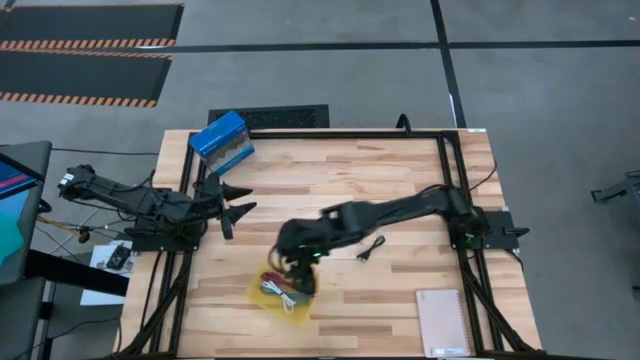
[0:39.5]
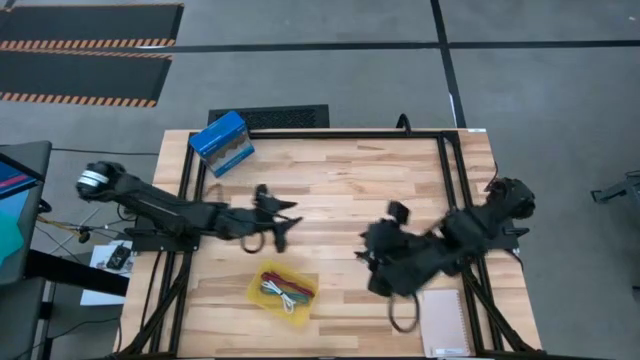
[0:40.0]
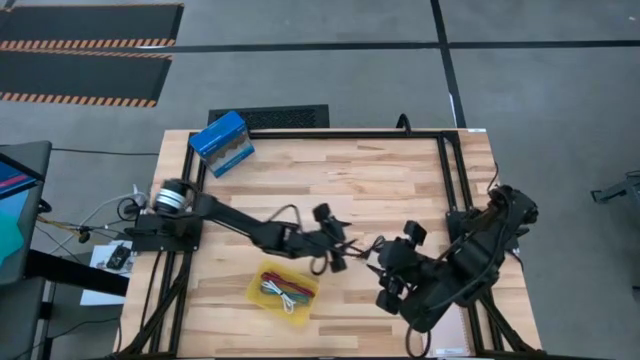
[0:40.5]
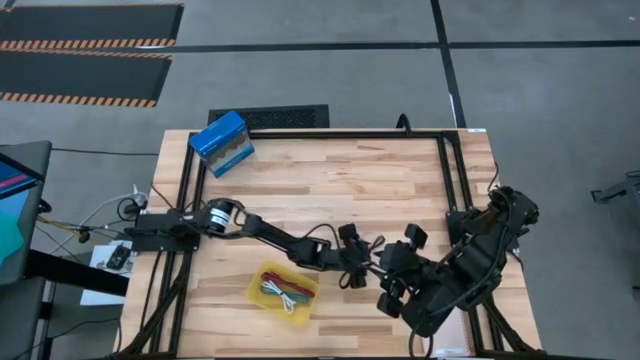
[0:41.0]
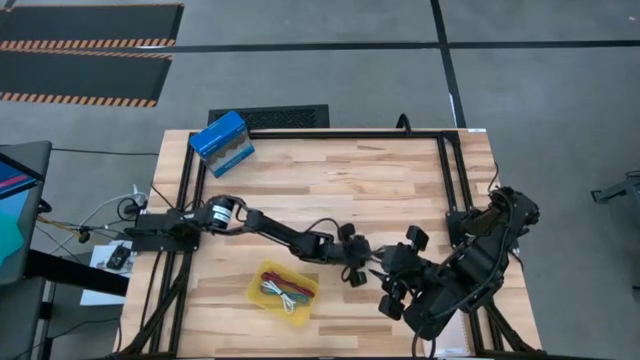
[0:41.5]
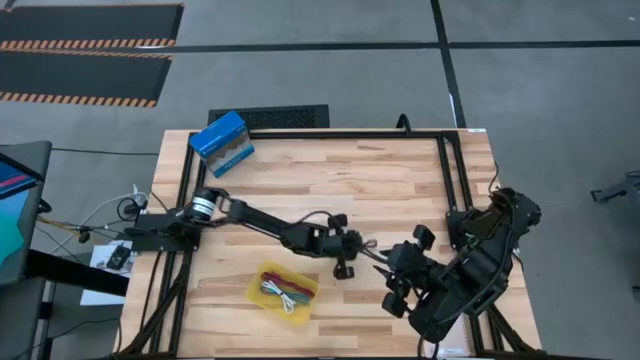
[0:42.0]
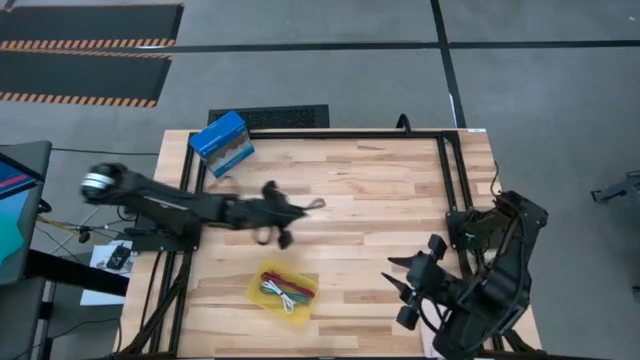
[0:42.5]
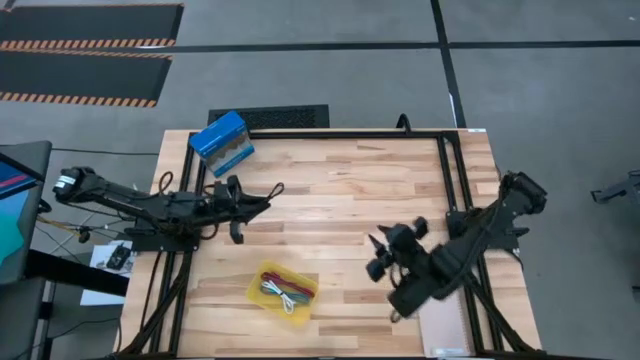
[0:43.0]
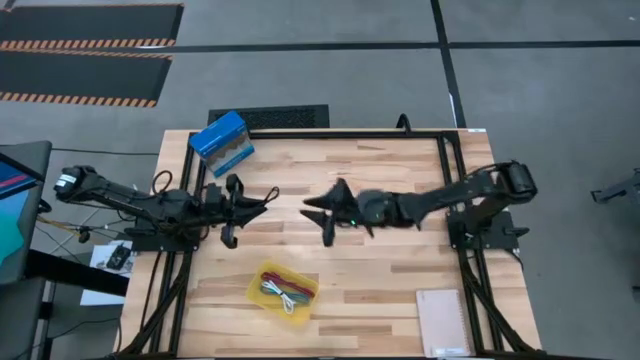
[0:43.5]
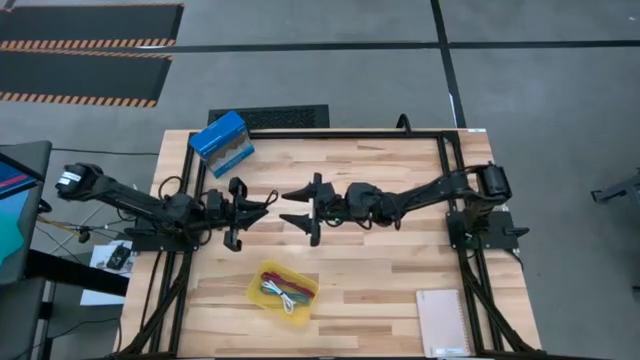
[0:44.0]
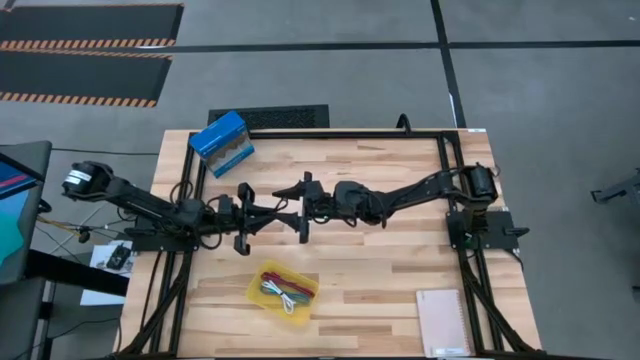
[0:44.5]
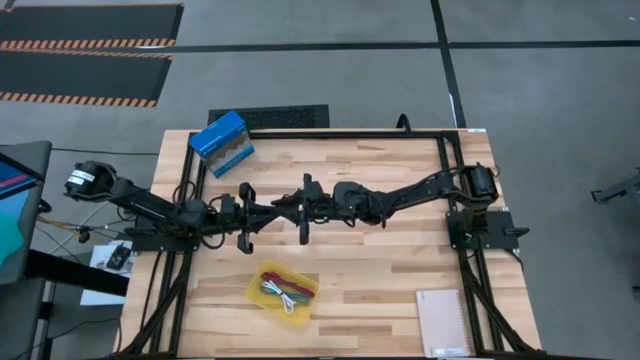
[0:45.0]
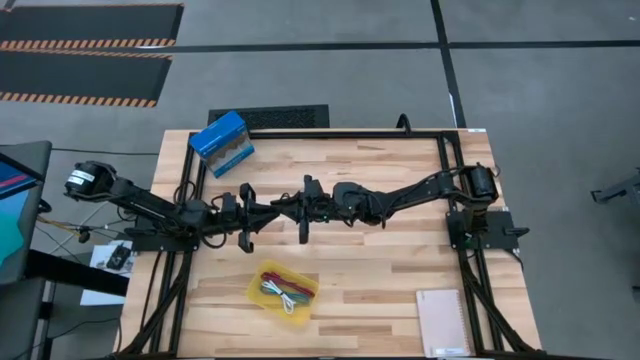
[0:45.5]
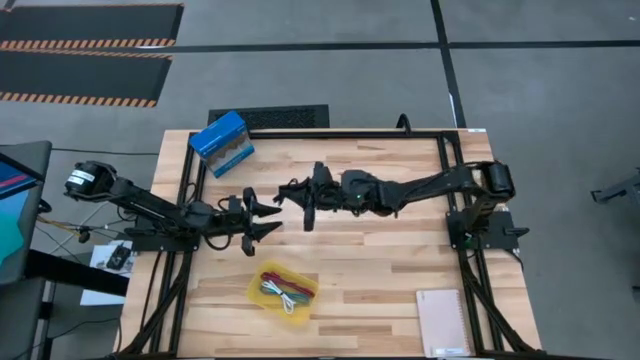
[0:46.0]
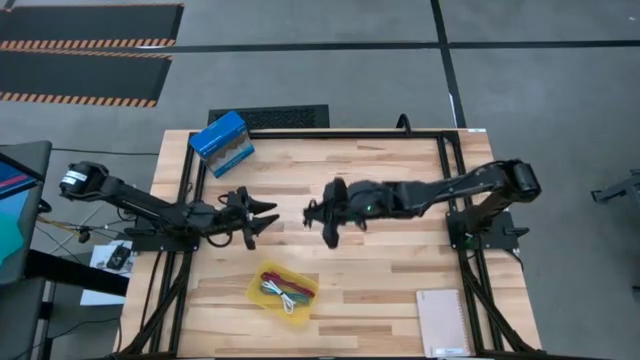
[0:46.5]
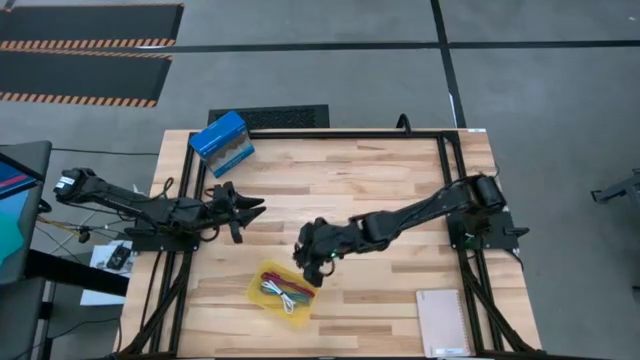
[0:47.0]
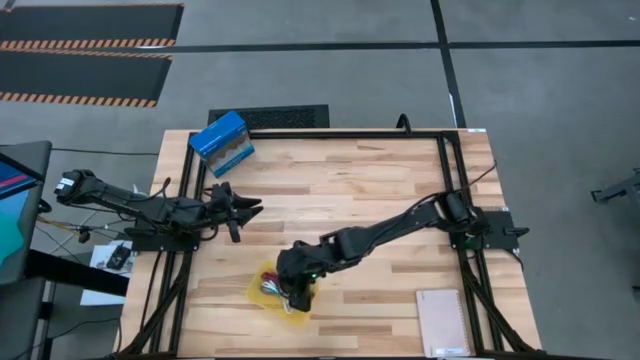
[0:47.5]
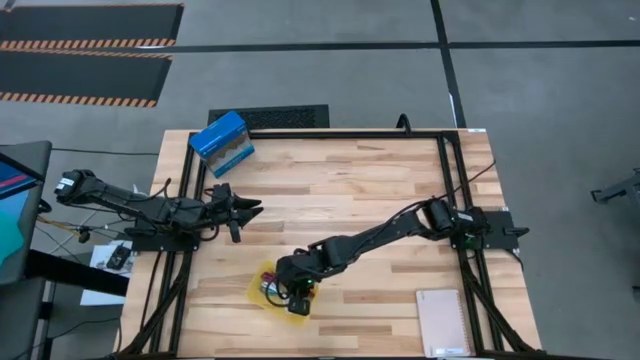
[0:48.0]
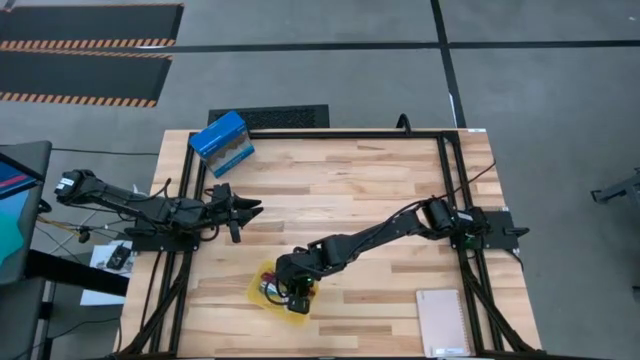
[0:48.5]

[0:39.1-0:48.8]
Task: Pick and place USB-C Cables
Put the black charger cable into the yellow transparent bin

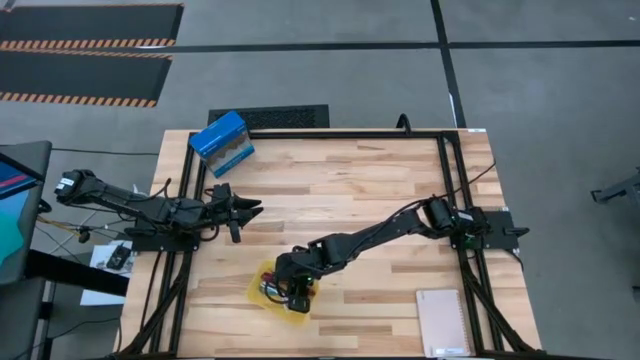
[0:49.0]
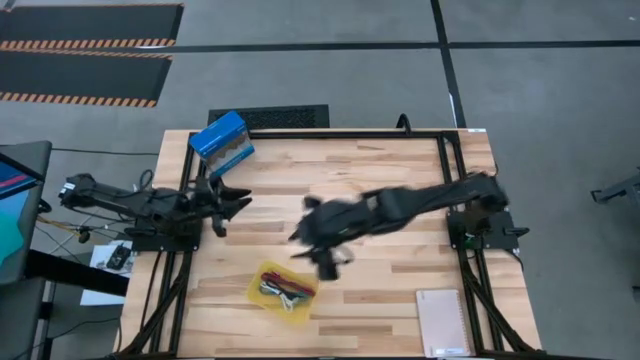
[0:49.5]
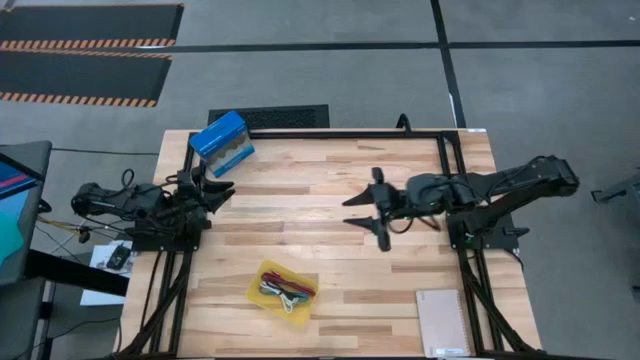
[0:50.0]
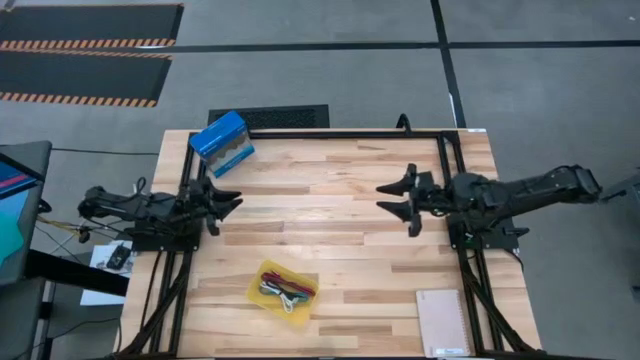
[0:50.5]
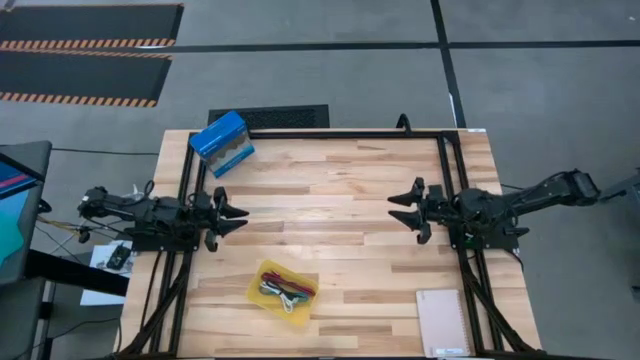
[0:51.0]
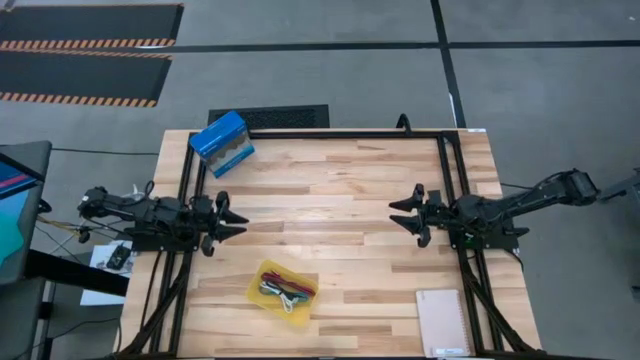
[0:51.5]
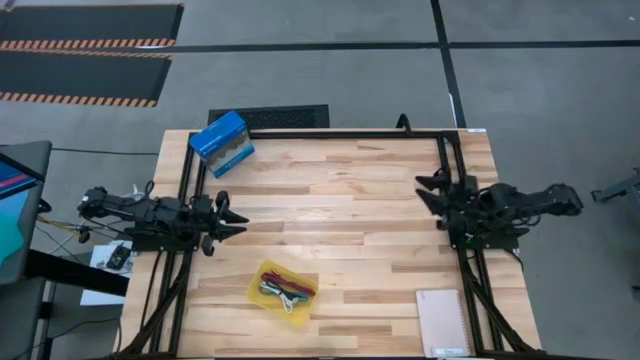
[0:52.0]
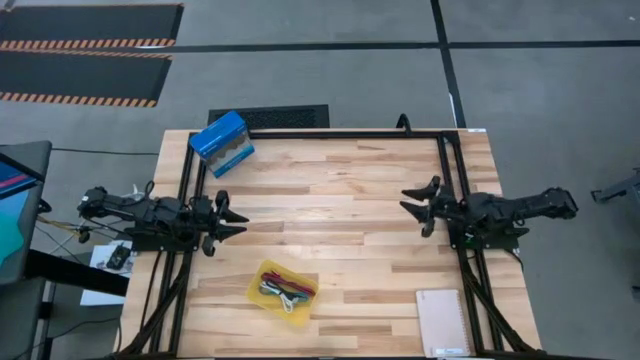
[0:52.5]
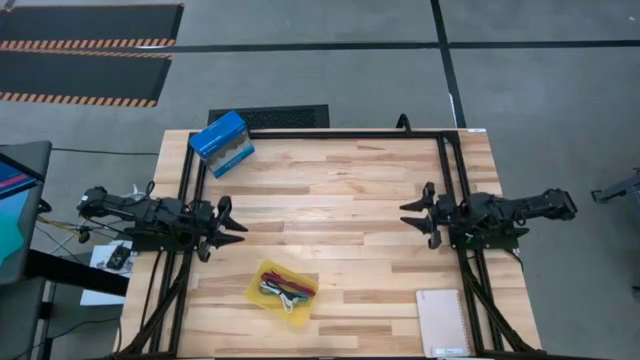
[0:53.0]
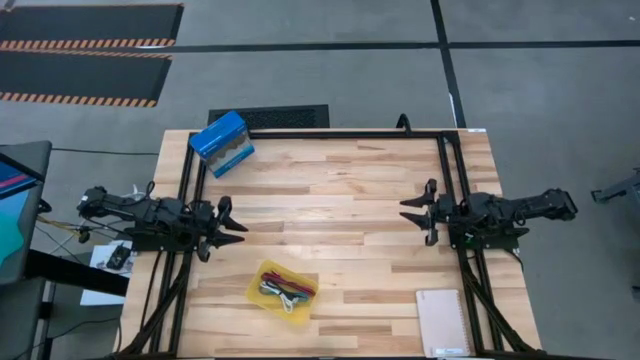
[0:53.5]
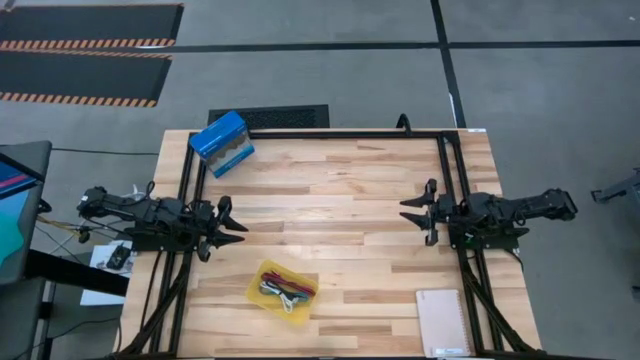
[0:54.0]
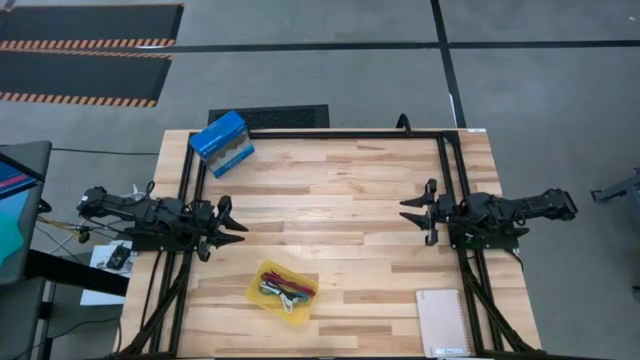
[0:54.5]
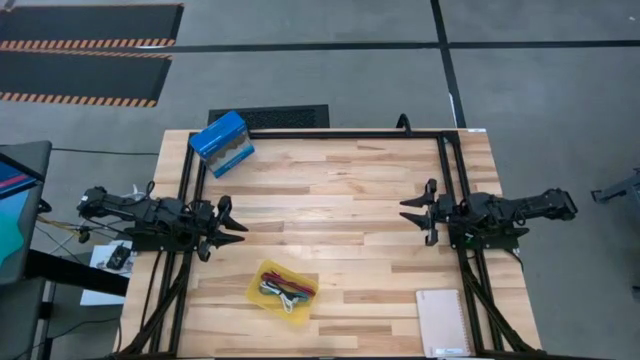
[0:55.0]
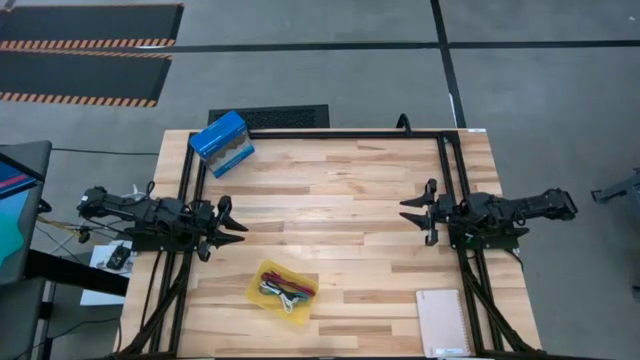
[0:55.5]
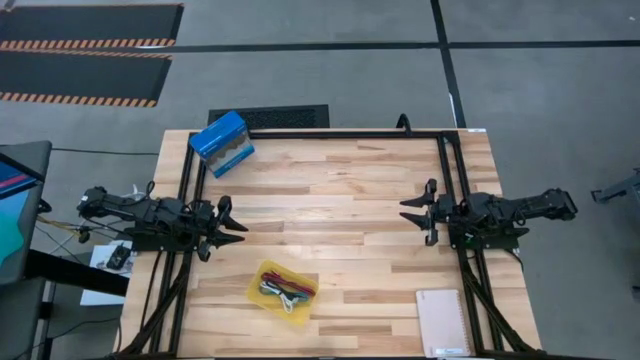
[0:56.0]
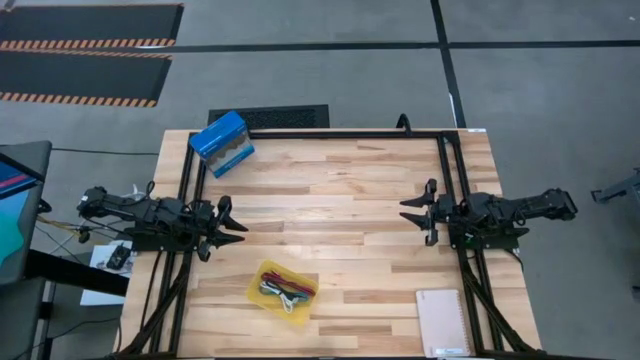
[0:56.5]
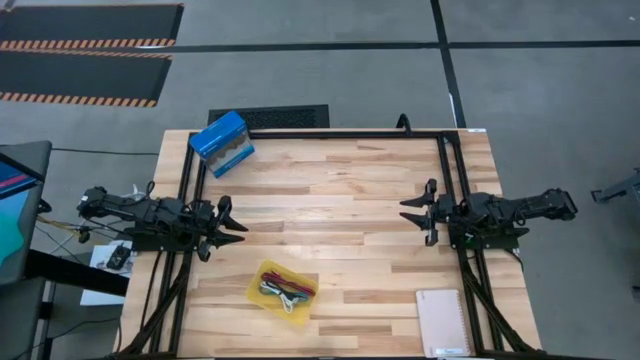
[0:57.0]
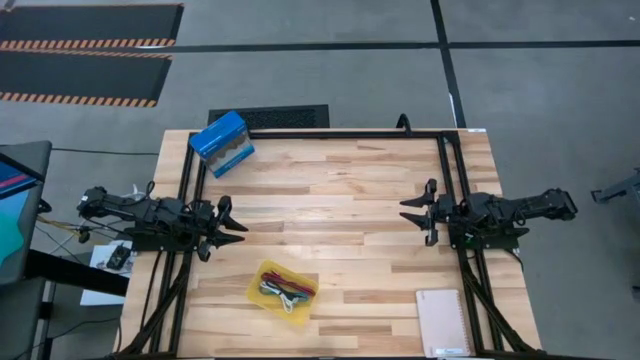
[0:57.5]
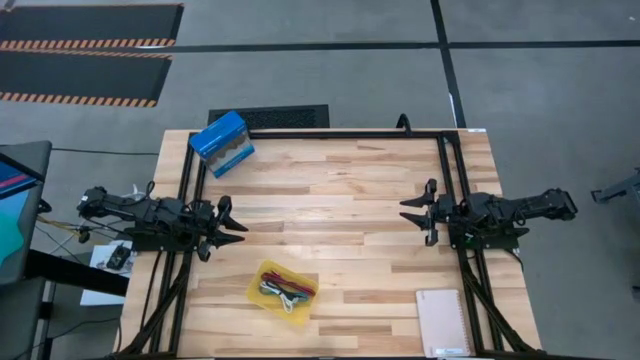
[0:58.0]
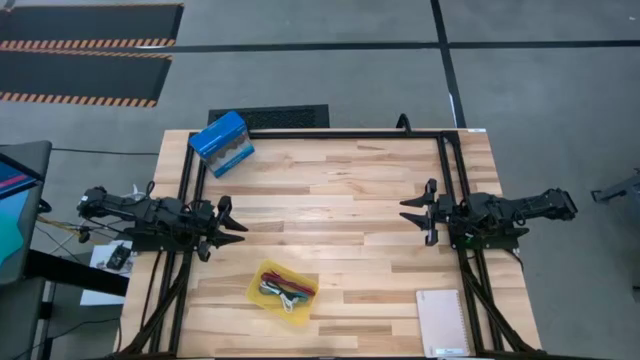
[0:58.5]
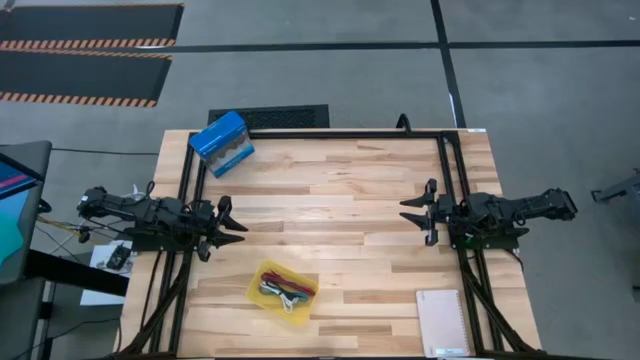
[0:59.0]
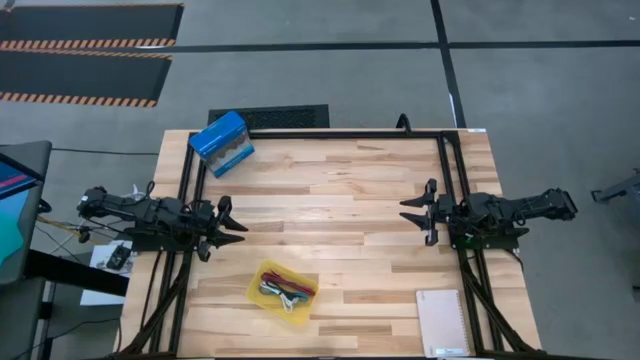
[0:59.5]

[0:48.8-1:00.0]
Return to Home Position

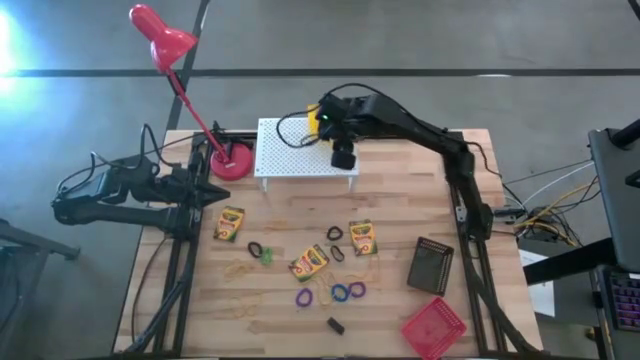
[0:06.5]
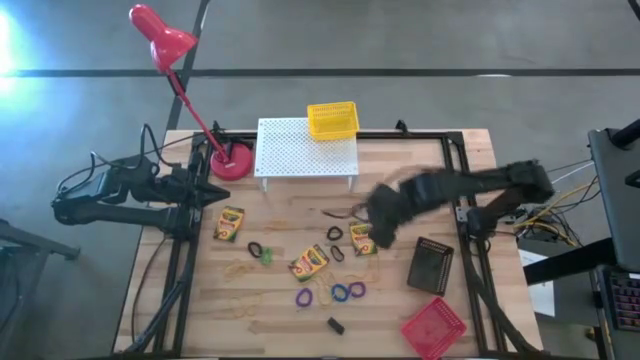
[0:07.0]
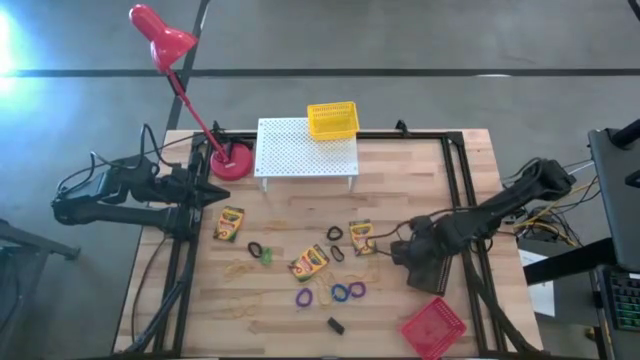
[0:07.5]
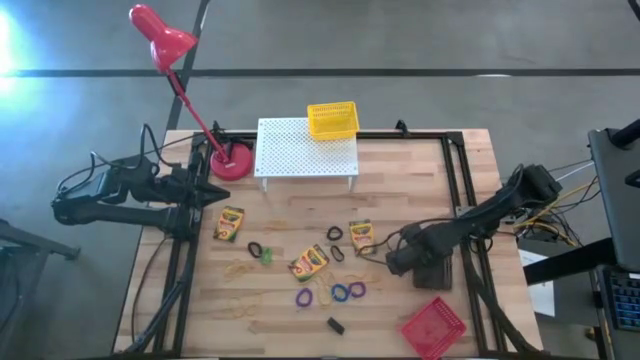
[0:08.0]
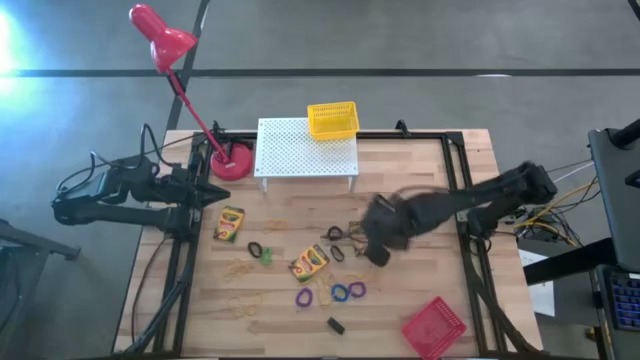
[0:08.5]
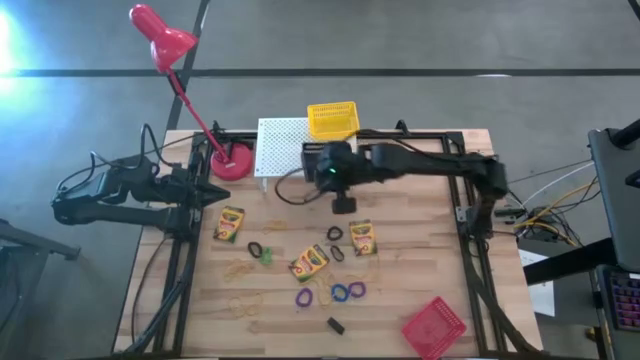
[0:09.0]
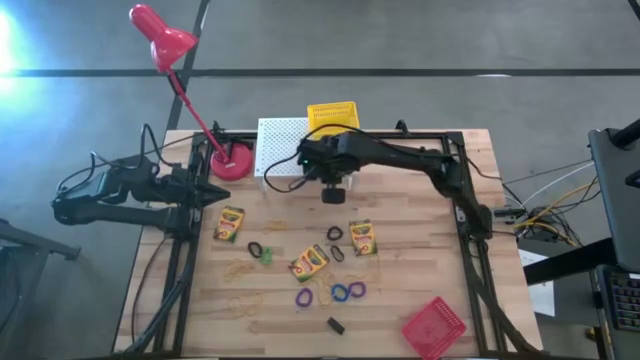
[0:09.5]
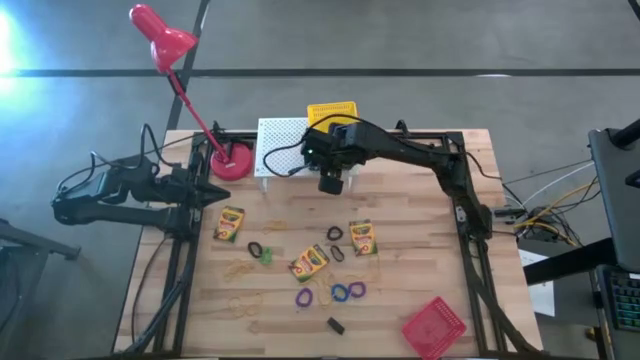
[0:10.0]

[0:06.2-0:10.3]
Task: Pick & Place Office Desk Supplies
Put the black bin on the shelf
